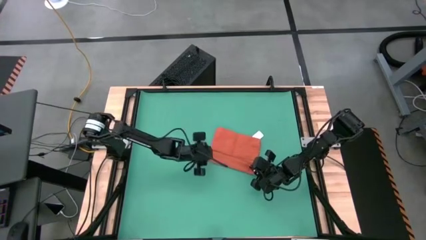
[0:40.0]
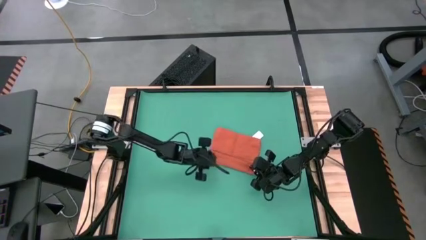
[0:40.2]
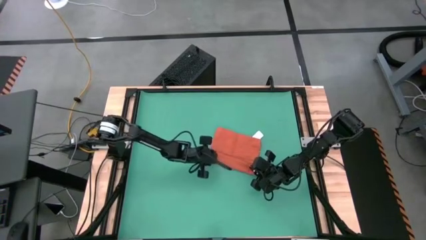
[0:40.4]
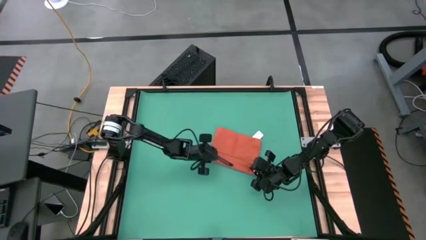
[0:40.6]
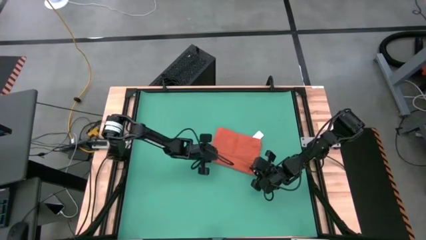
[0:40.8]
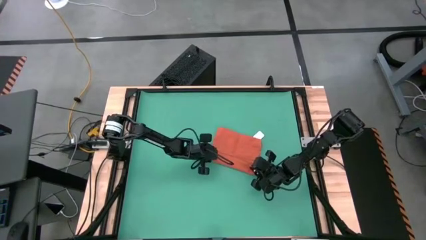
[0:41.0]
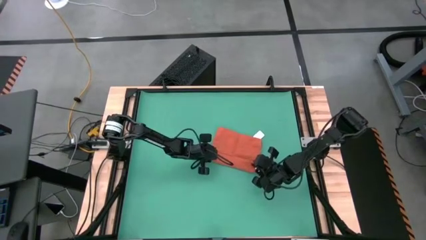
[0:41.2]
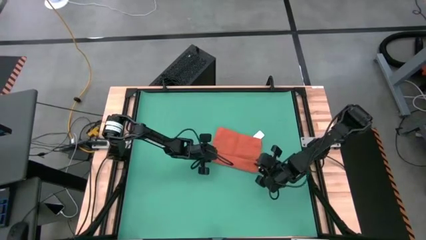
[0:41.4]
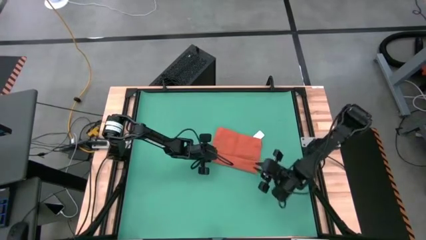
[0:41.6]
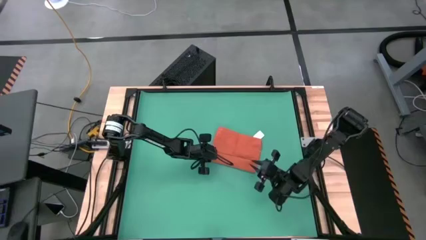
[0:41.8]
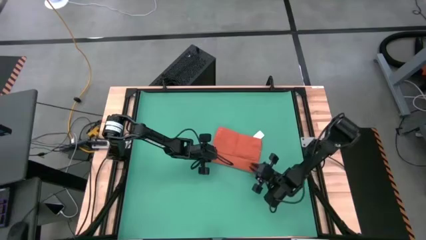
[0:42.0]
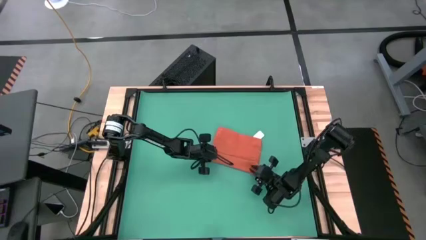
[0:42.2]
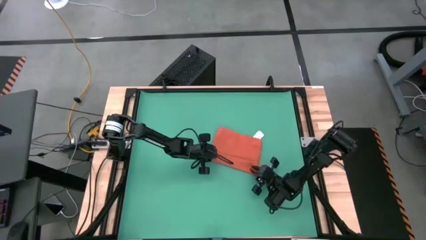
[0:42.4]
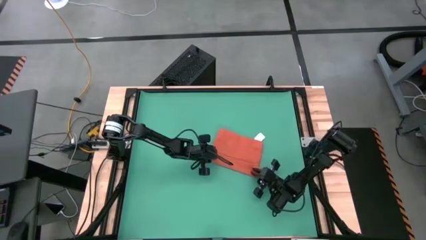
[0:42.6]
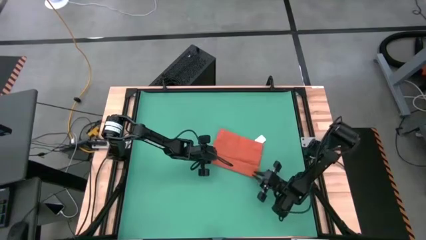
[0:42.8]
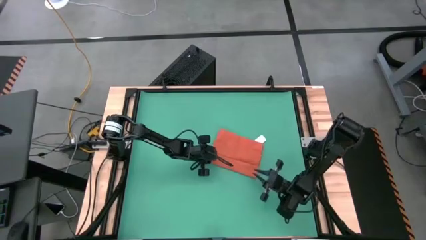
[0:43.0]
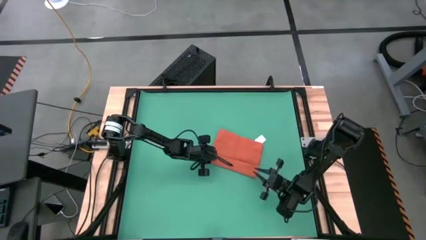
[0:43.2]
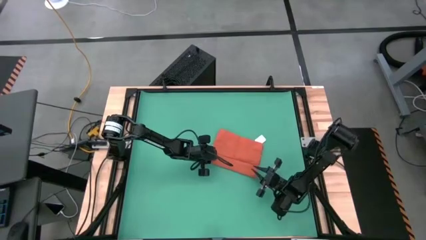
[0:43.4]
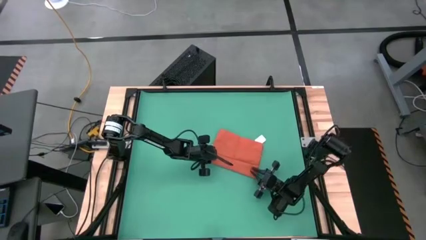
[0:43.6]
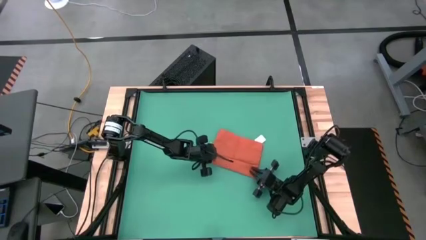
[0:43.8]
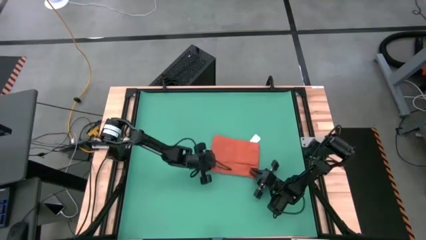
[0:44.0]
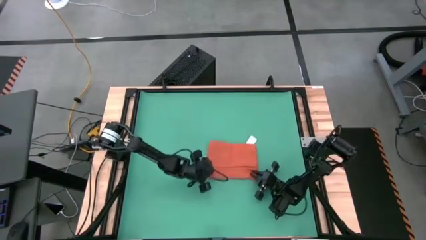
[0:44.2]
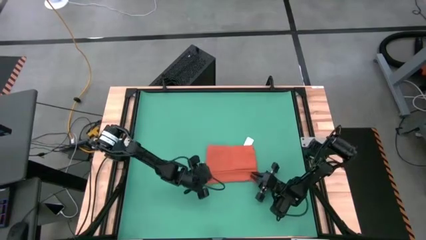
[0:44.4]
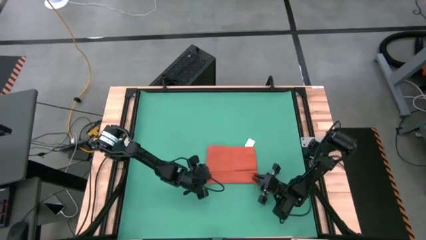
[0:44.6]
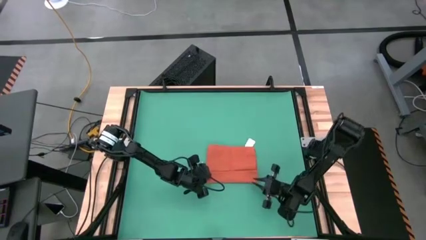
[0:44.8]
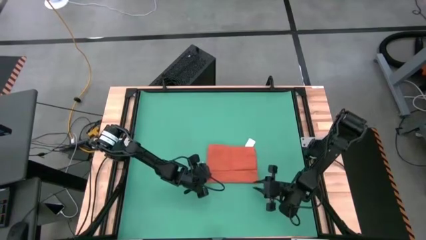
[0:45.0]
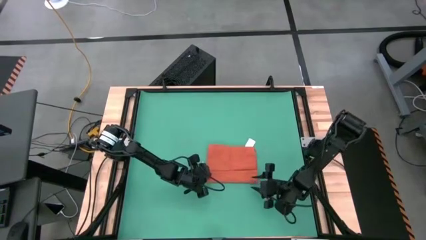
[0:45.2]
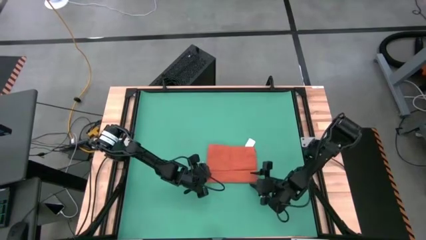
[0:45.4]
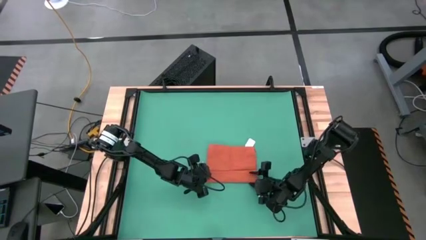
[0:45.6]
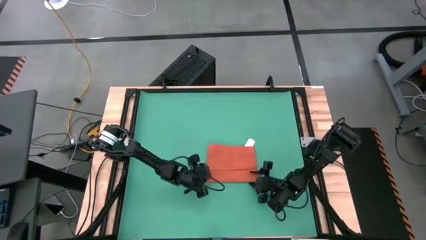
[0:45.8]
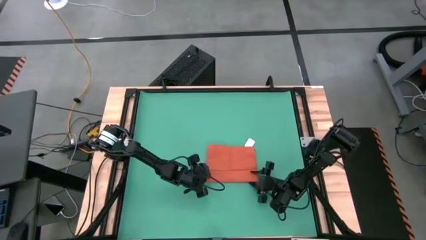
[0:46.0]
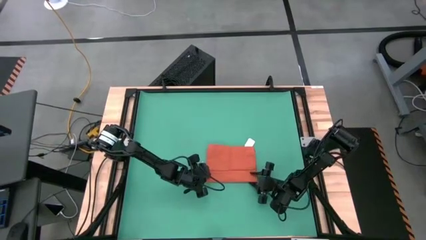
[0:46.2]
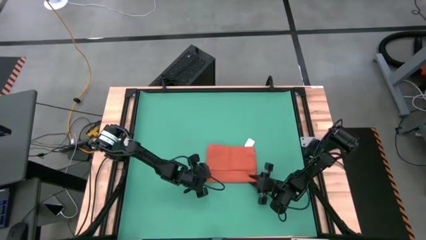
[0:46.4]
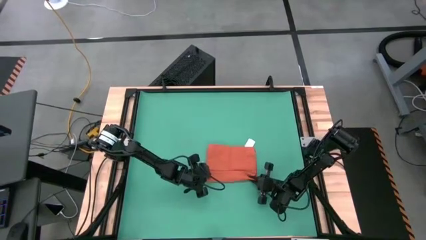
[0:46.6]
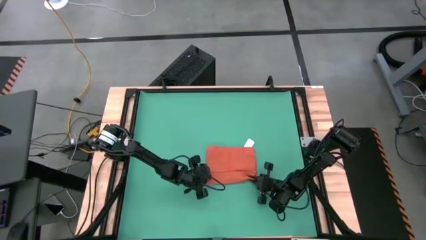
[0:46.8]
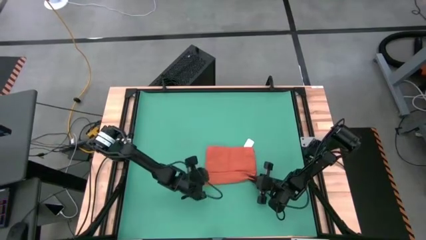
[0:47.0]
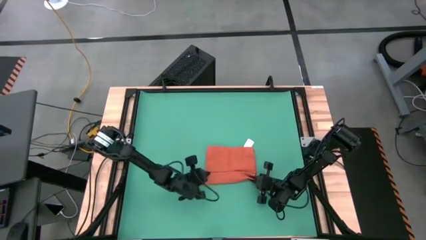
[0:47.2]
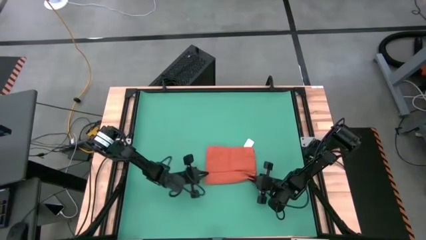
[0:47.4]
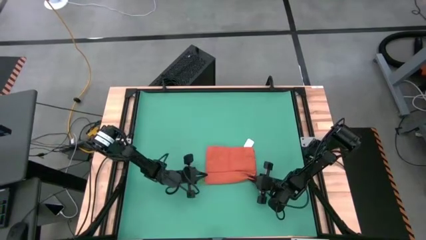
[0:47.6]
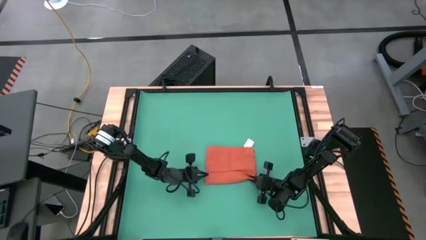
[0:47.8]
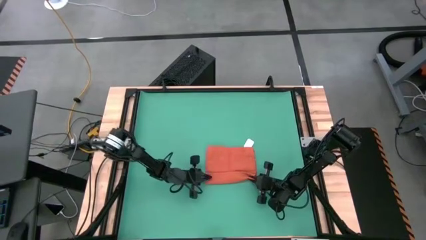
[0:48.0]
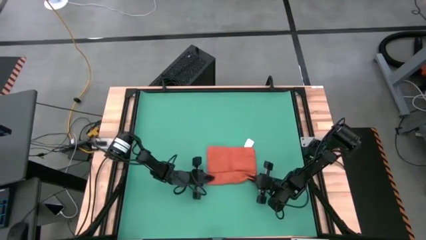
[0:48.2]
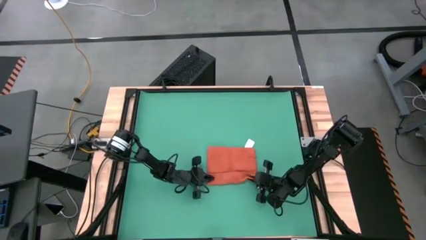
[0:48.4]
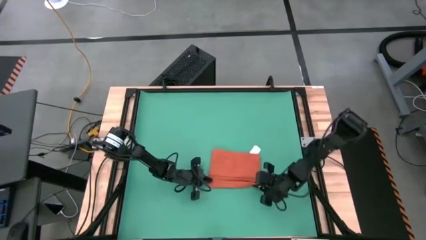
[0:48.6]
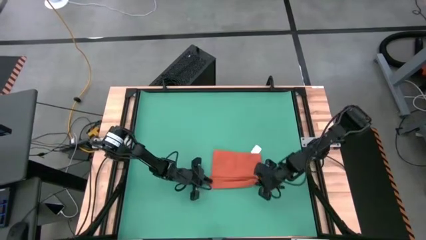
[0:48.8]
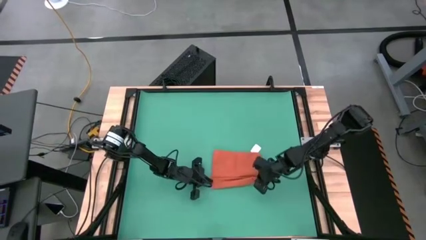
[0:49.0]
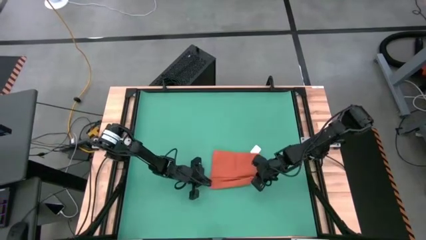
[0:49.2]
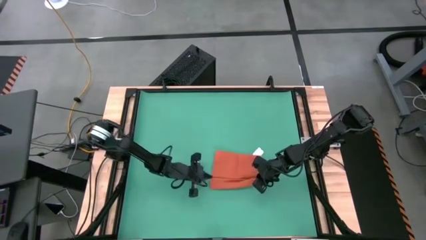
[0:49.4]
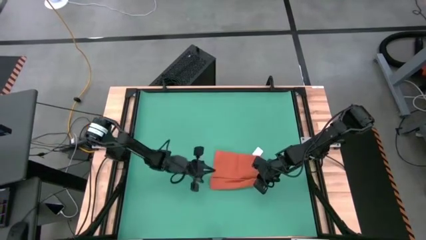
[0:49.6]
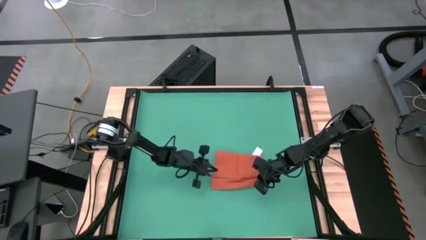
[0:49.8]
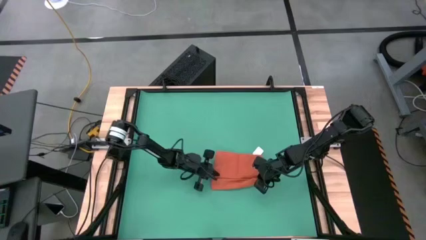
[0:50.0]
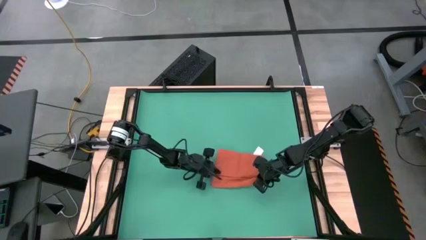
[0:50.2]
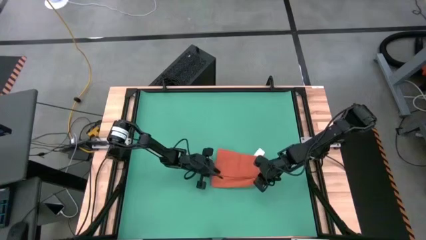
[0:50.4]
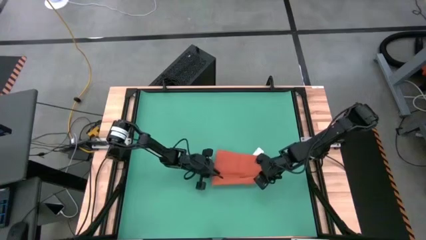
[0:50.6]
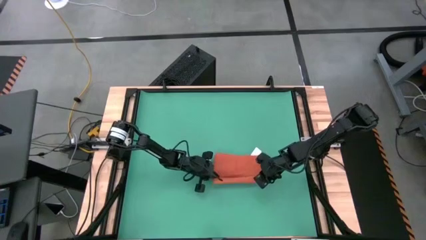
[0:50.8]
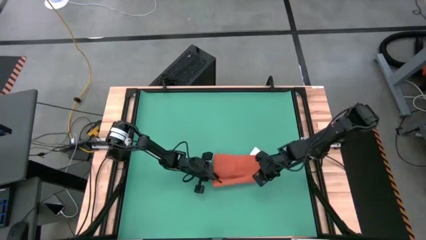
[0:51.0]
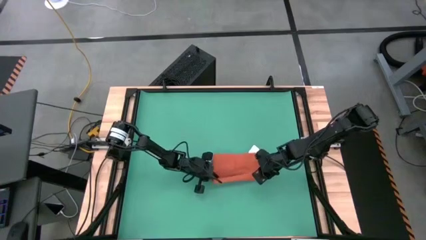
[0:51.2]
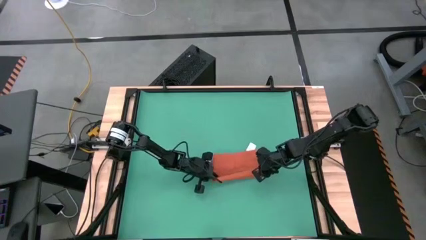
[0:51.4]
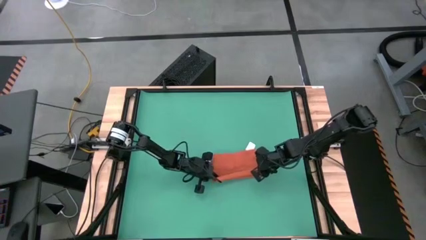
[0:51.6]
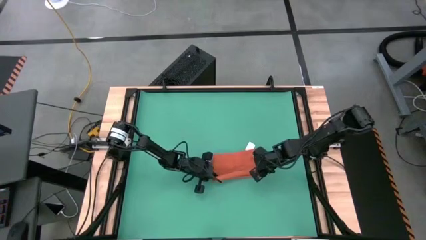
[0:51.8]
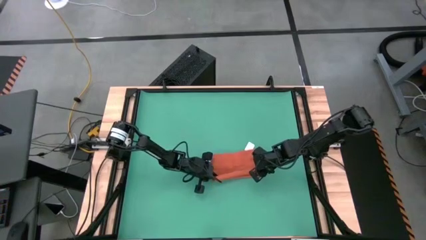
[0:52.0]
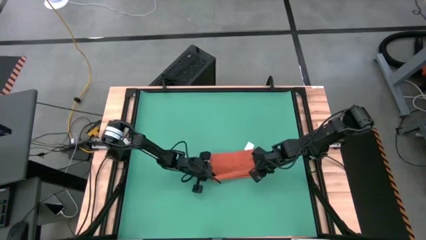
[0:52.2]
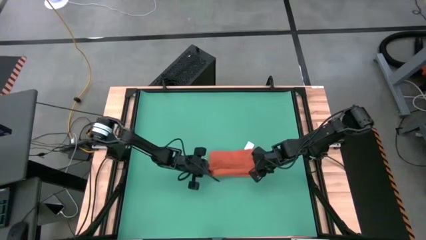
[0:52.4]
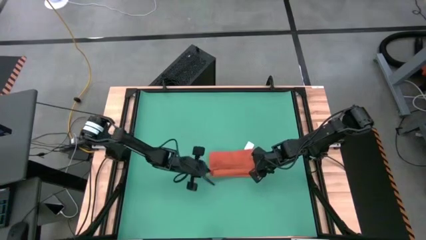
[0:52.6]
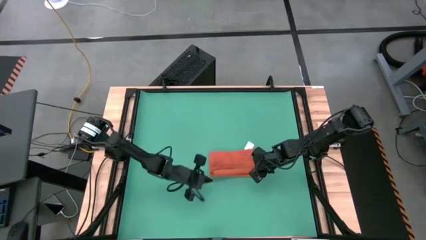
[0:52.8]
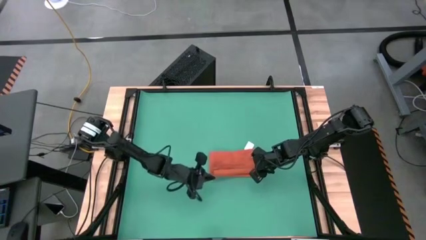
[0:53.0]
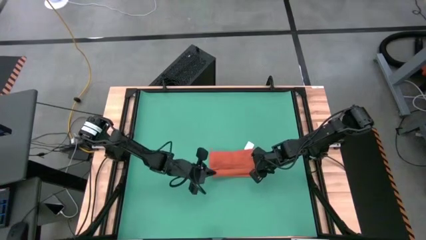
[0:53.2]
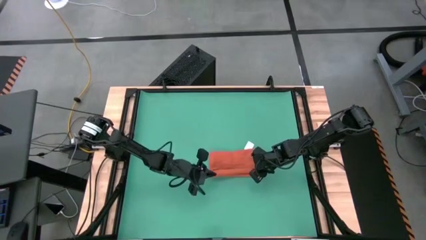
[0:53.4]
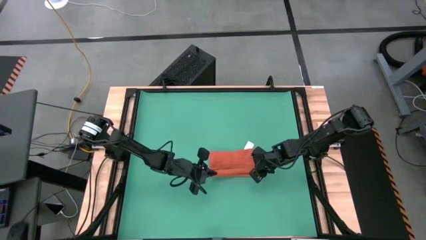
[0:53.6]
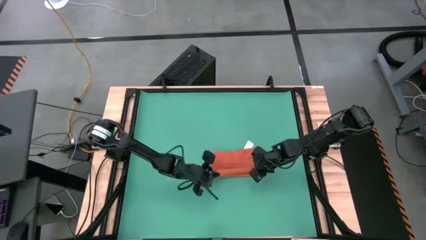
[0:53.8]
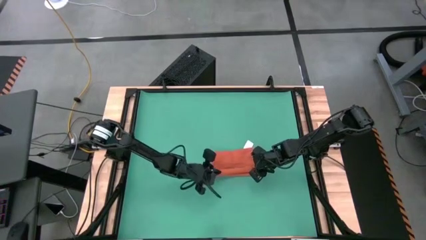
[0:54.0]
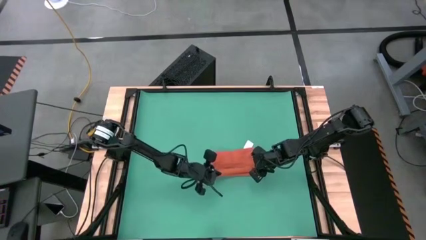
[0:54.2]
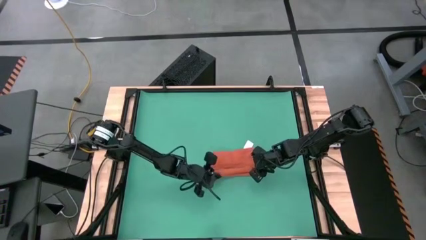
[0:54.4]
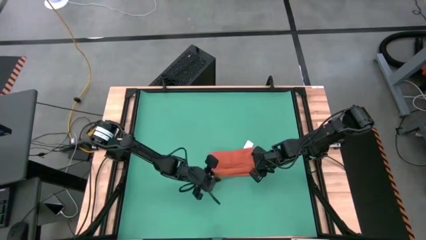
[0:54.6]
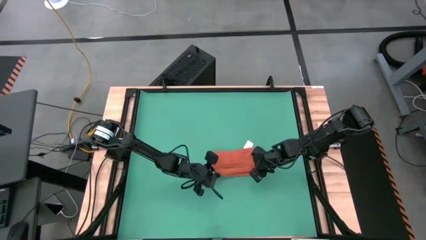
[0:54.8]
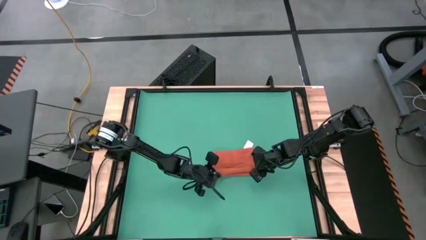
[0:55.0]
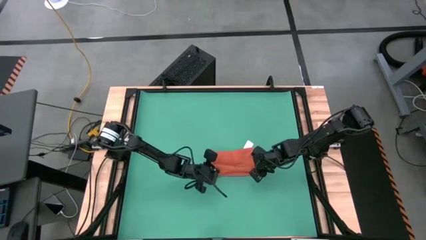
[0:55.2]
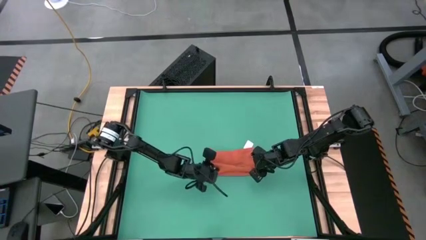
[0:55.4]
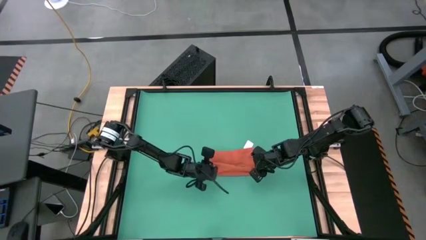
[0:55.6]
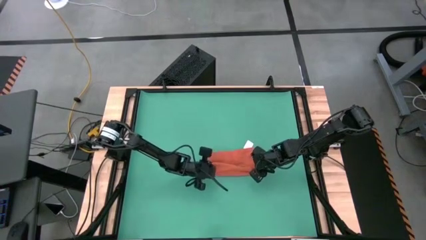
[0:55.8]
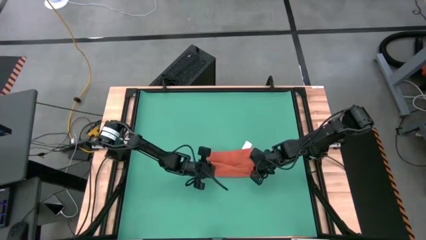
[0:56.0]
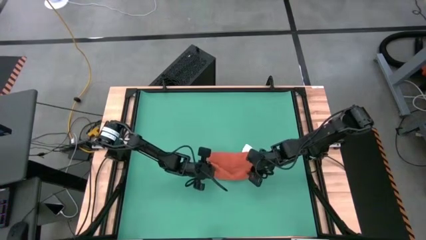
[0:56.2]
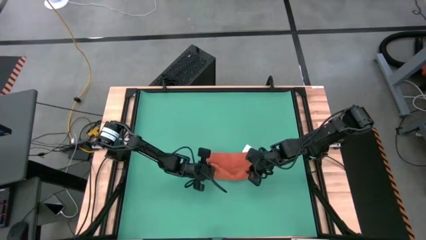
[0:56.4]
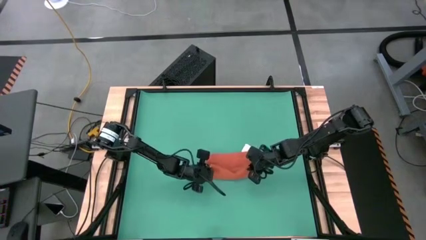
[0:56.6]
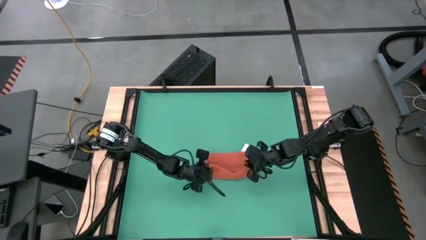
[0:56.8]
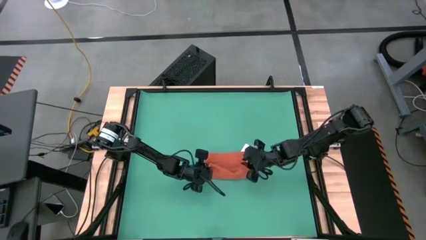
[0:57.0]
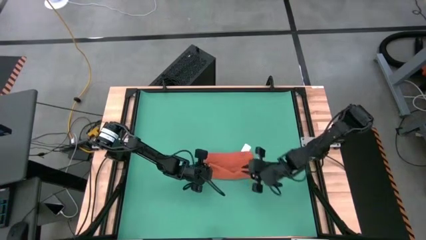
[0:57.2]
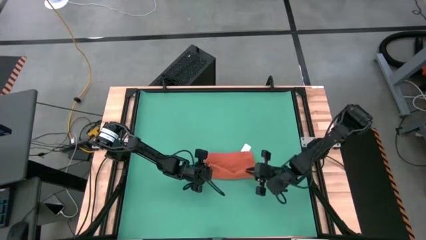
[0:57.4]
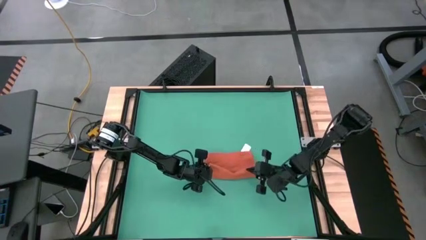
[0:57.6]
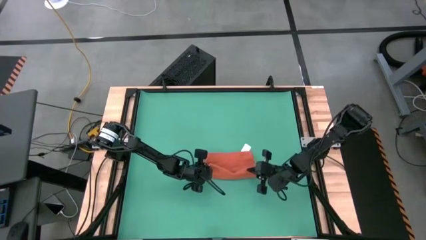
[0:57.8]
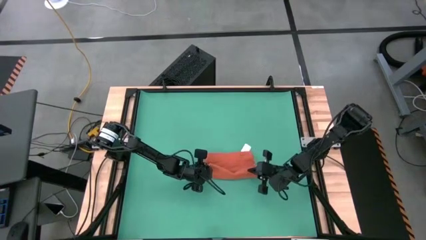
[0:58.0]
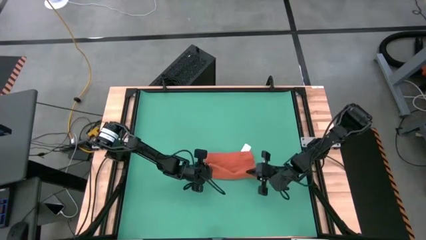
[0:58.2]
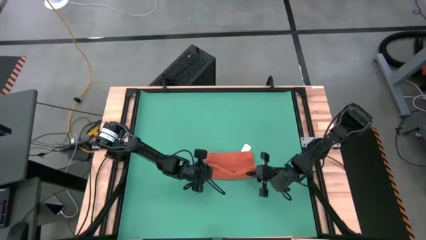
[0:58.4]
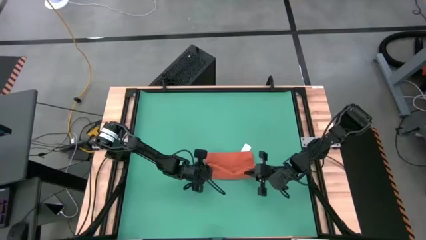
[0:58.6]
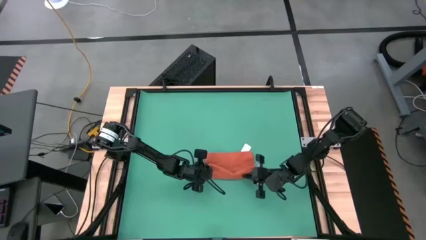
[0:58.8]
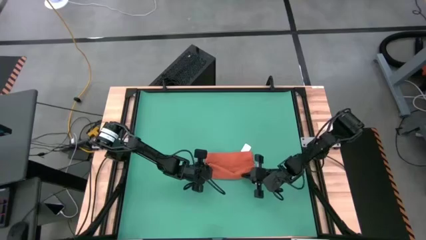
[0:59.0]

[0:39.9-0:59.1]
Task: Roll towel
Roll the orange towel
